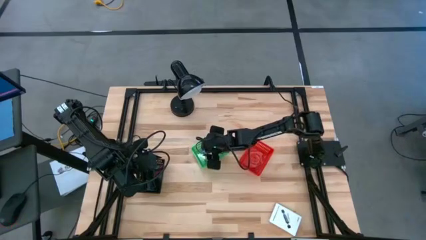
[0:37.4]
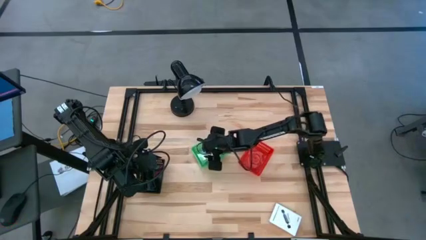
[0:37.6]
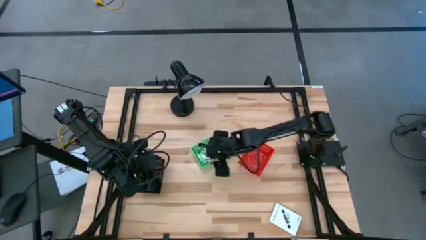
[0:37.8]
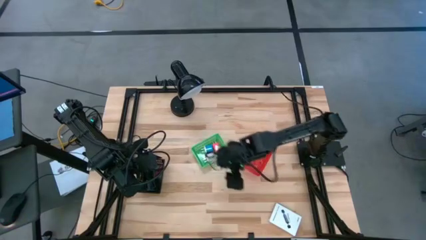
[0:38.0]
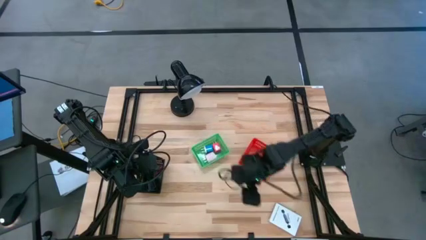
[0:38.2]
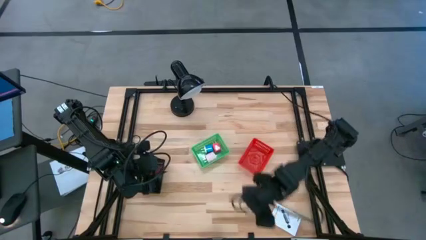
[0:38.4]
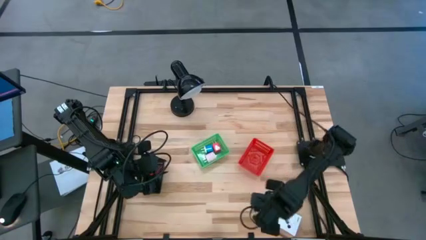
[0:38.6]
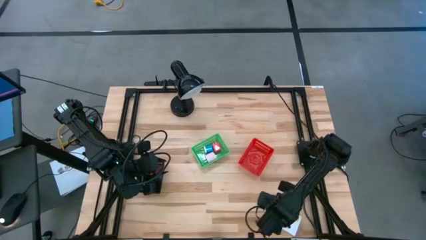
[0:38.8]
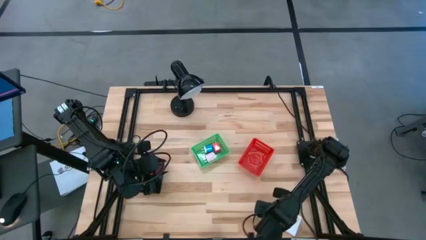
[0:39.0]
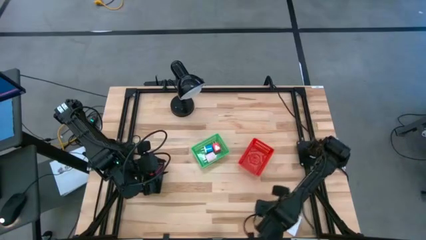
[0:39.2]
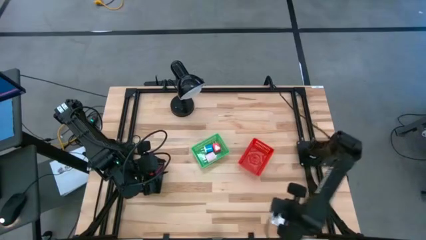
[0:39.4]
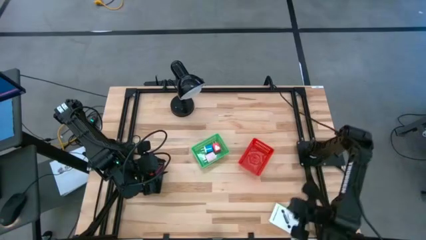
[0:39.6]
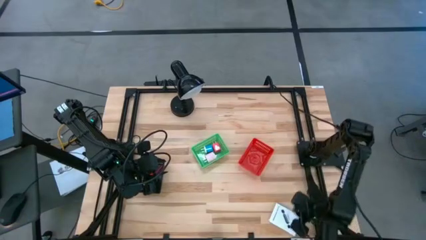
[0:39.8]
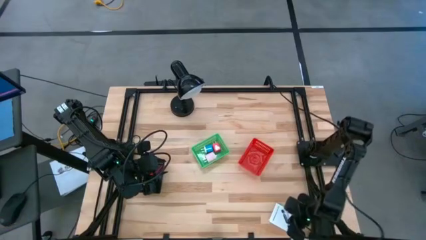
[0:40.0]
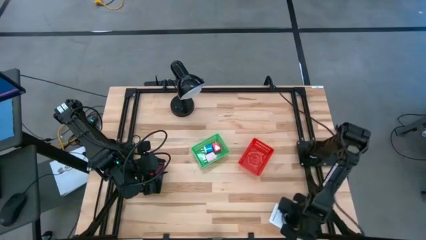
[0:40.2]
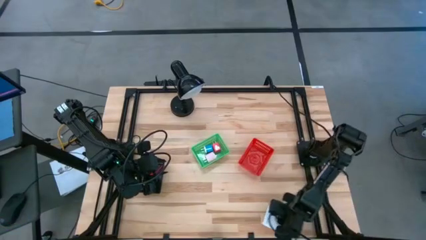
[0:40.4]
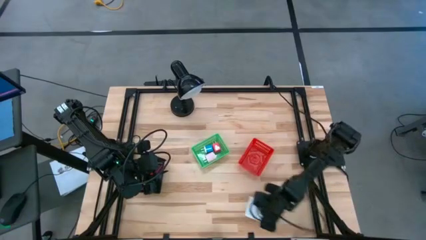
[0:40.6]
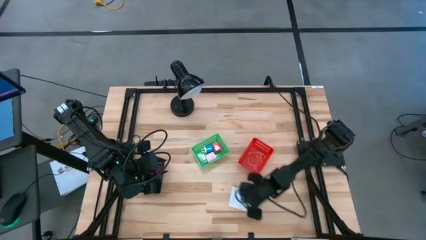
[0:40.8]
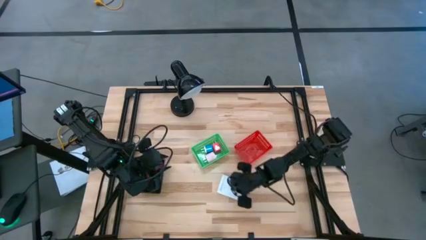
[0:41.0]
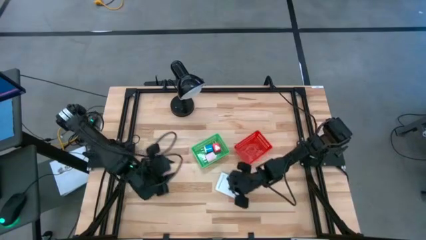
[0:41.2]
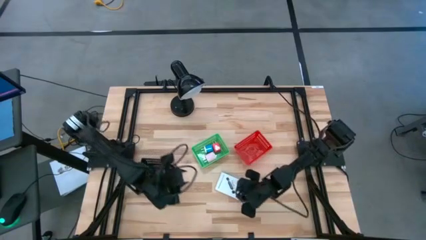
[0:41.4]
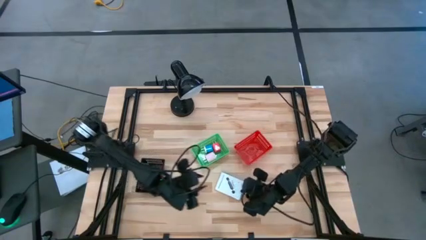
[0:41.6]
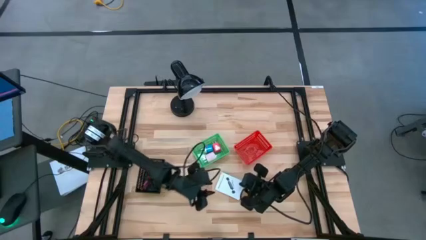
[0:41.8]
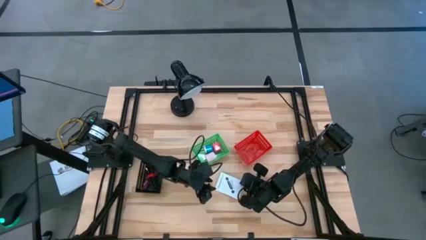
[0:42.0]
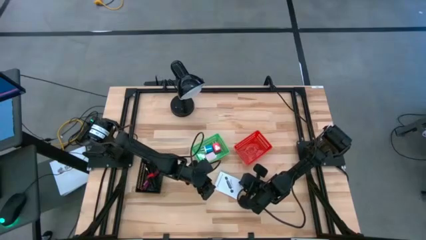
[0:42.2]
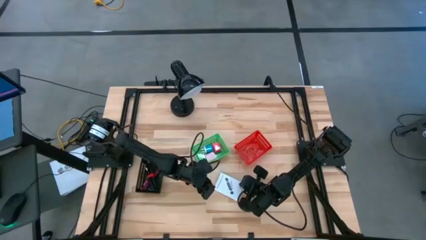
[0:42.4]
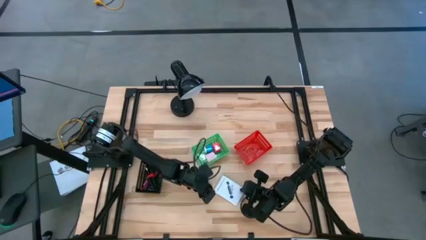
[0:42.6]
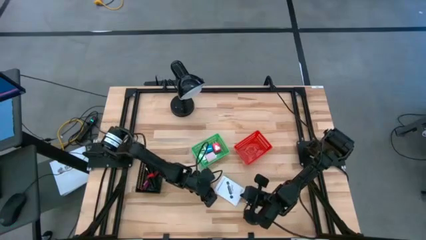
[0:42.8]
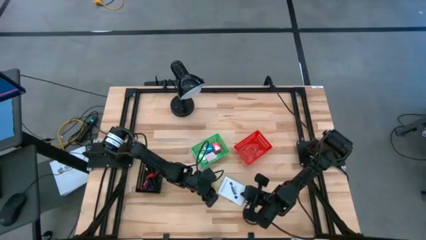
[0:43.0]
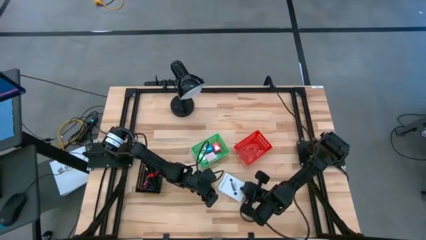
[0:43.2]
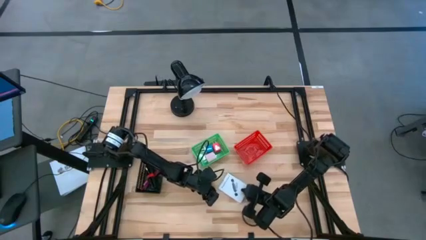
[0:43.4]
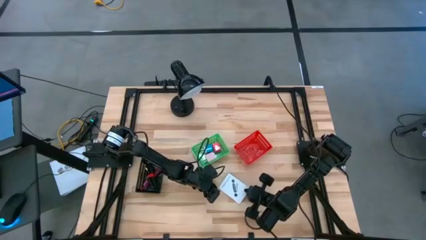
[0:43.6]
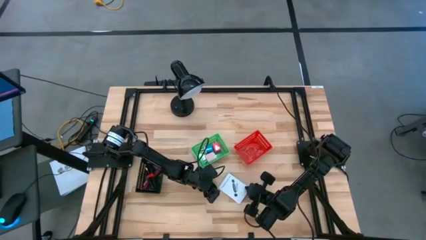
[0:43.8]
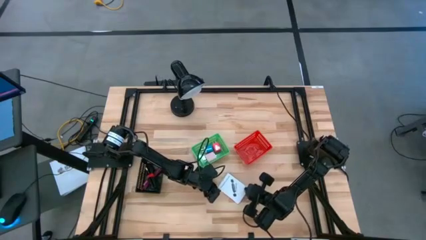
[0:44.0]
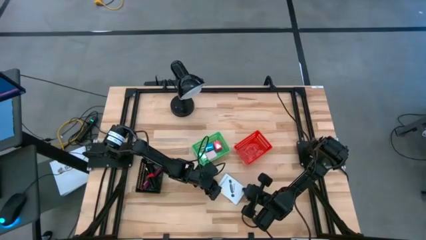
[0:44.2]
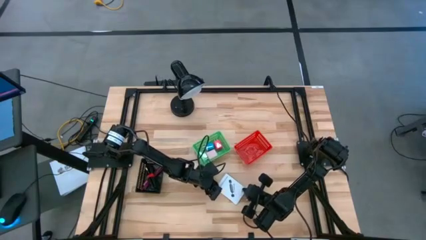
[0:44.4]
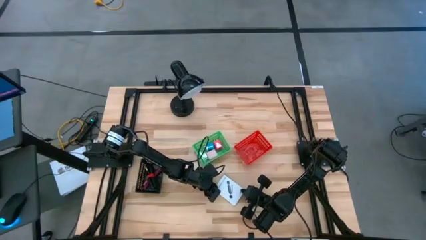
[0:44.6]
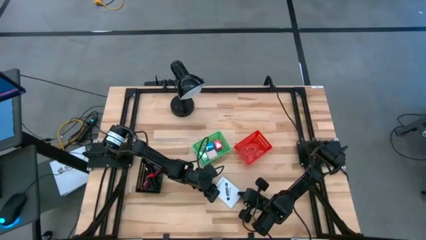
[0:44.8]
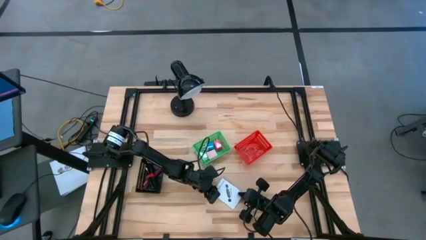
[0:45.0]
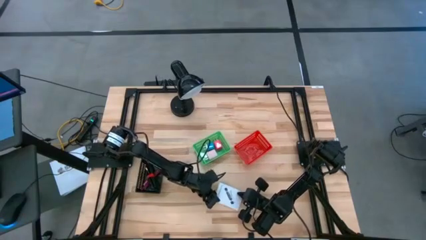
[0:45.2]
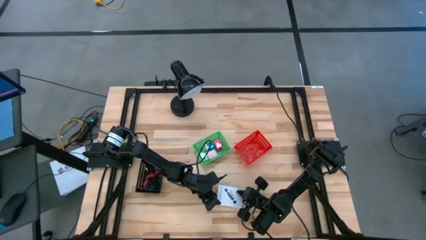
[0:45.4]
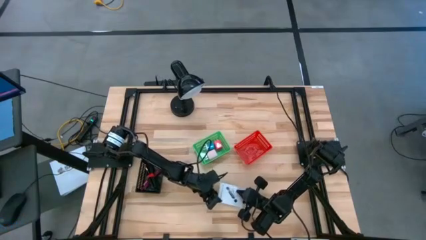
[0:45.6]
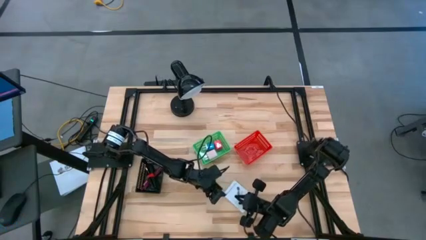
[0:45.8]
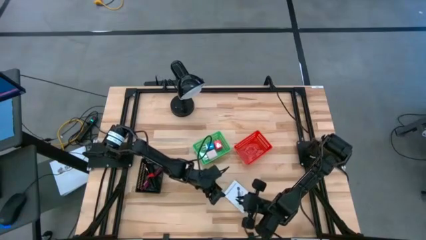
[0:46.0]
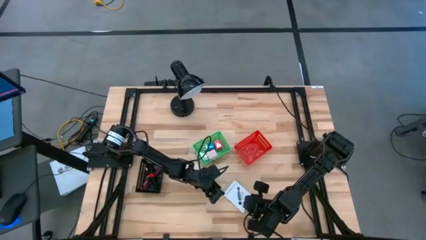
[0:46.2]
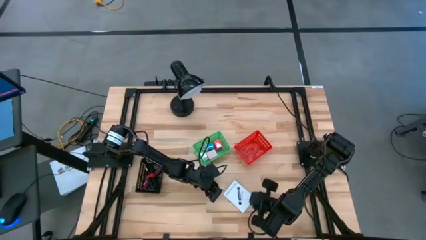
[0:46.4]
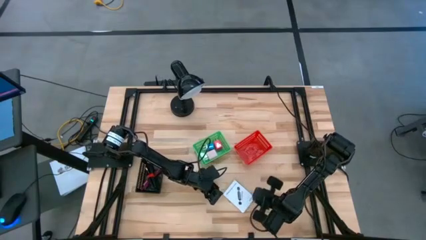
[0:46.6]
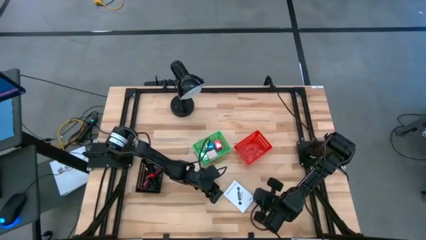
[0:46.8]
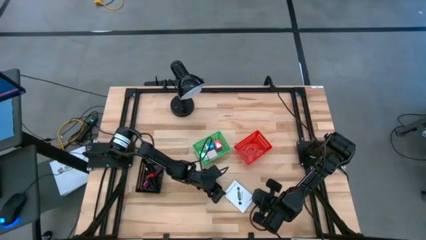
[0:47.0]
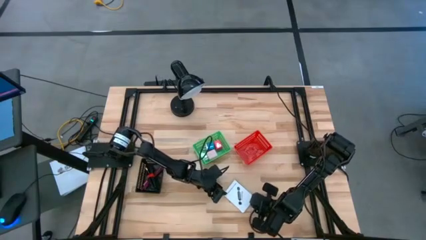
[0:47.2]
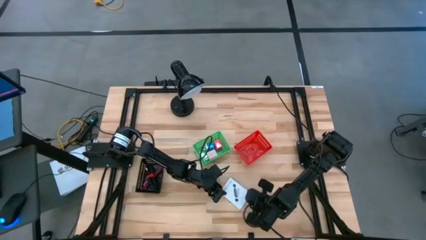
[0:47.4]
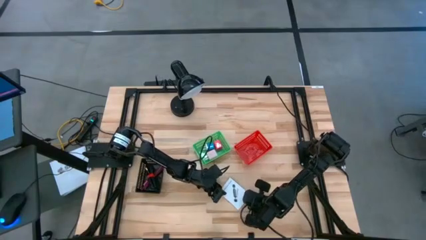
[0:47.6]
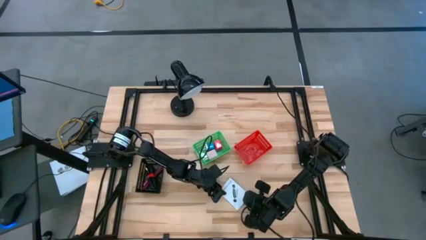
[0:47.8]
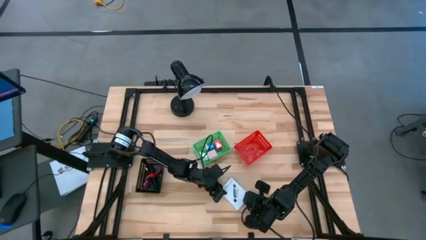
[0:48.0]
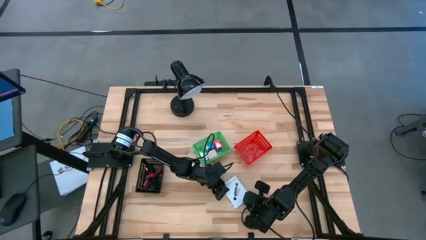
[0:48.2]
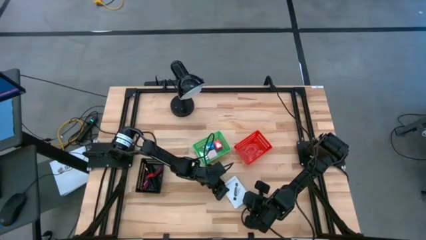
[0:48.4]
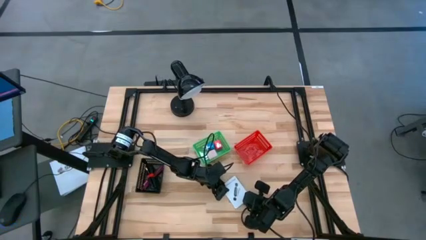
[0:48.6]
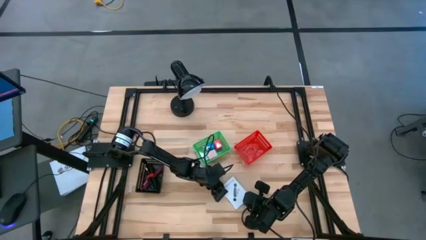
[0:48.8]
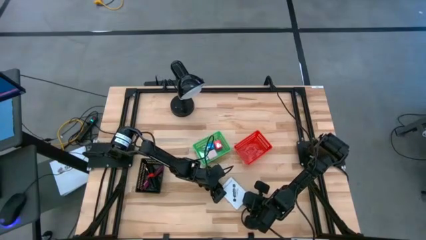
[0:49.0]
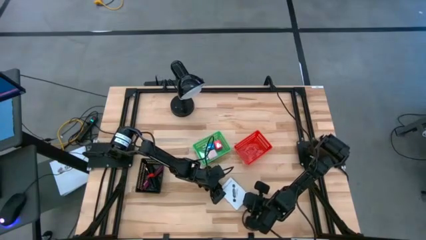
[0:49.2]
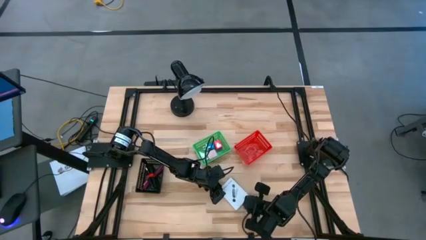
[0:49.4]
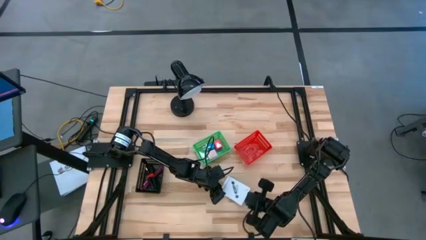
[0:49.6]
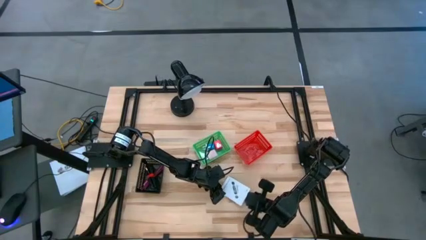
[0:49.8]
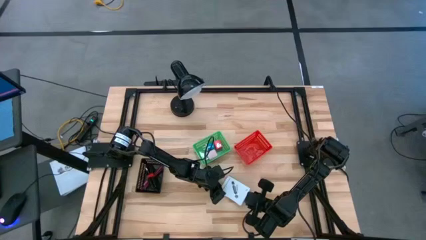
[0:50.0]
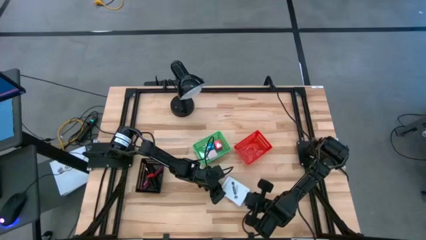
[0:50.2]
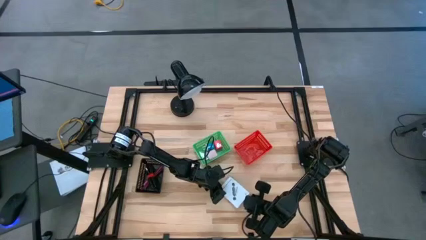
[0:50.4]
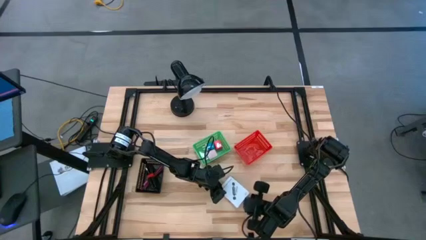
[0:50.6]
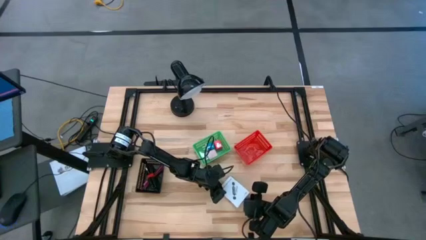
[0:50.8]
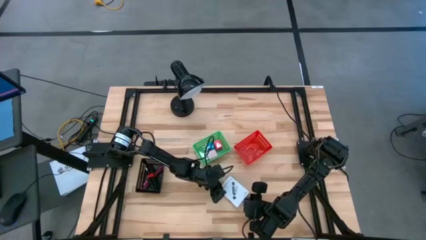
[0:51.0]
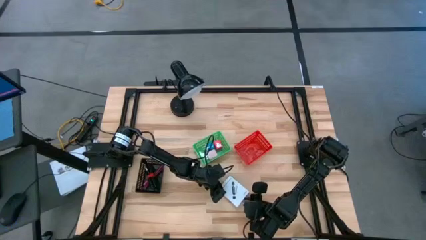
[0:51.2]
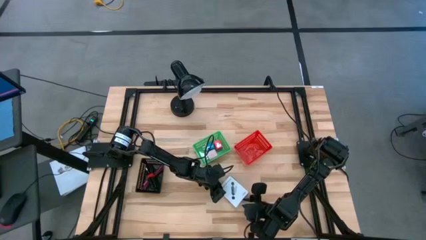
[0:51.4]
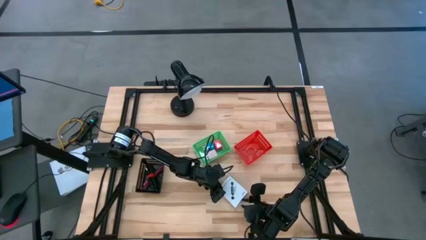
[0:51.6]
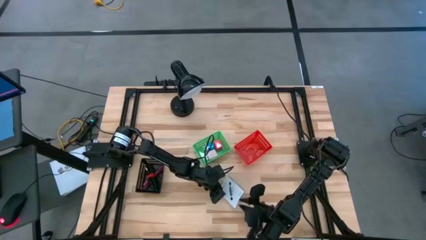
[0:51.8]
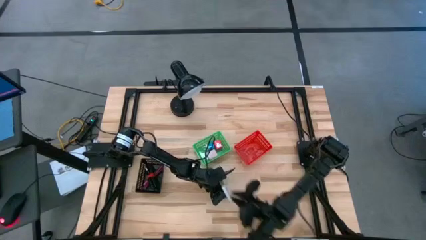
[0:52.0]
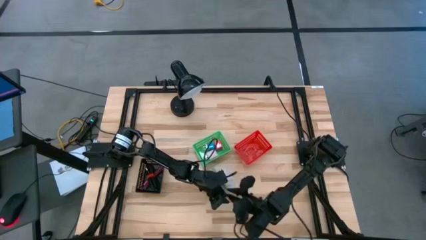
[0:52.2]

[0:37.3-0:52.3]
Task: Pick and place items into bin
Put the white card reader box into the red bin
